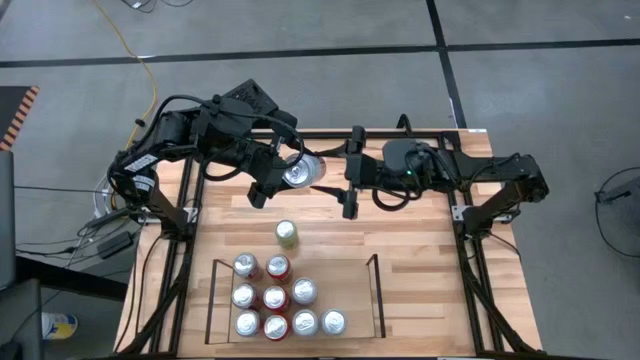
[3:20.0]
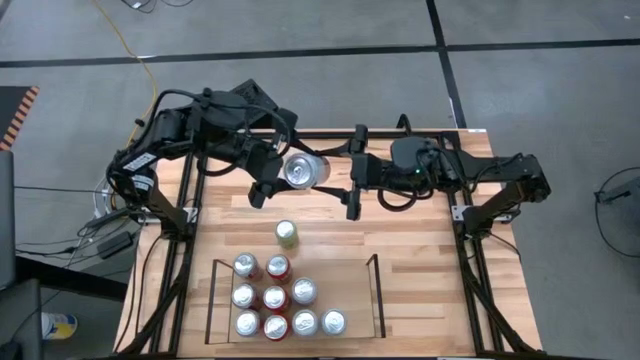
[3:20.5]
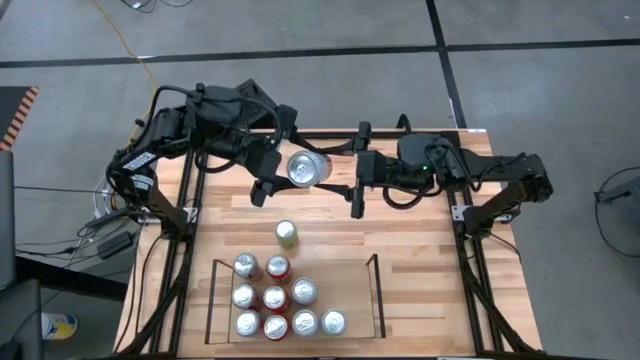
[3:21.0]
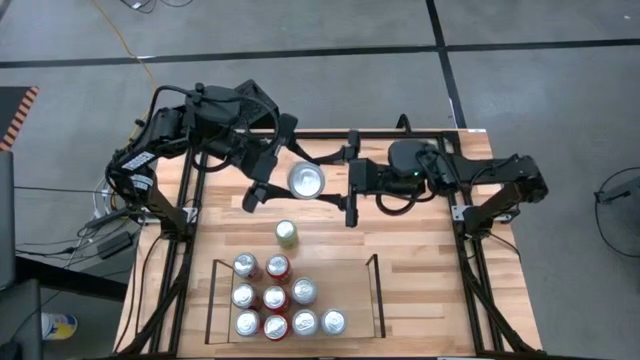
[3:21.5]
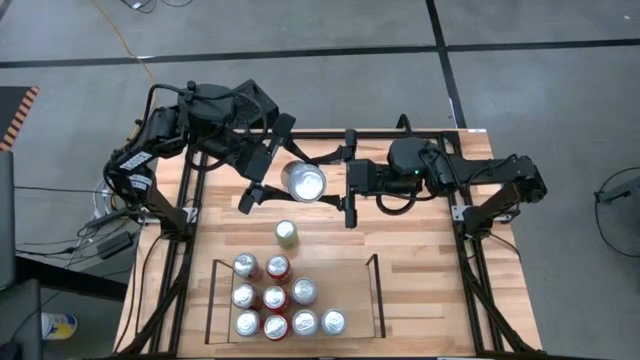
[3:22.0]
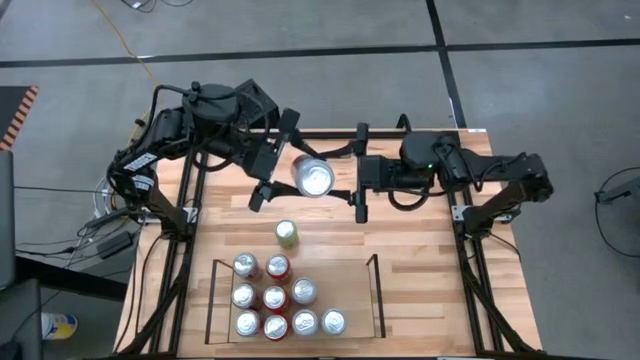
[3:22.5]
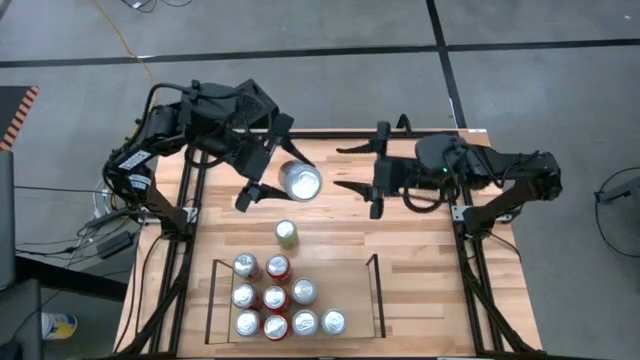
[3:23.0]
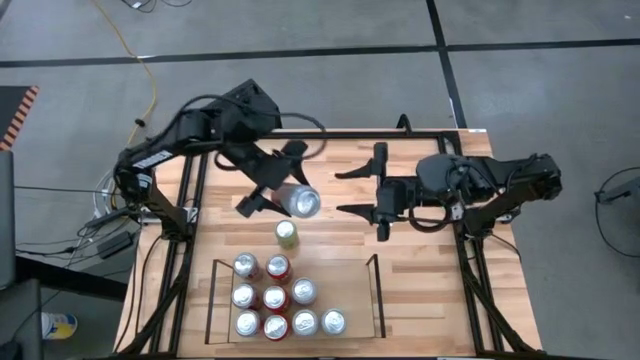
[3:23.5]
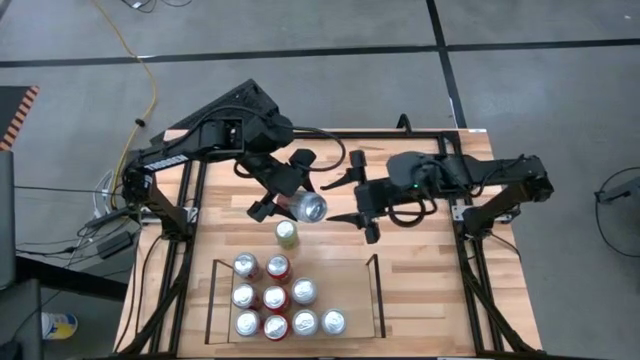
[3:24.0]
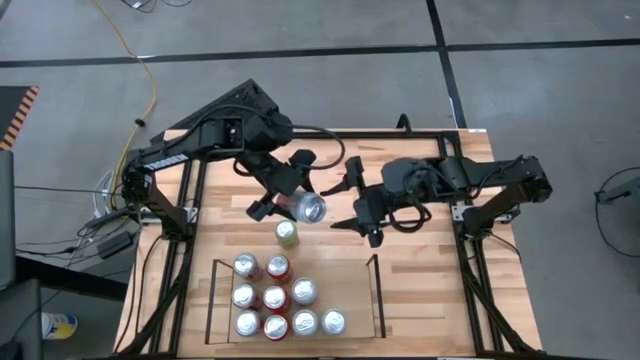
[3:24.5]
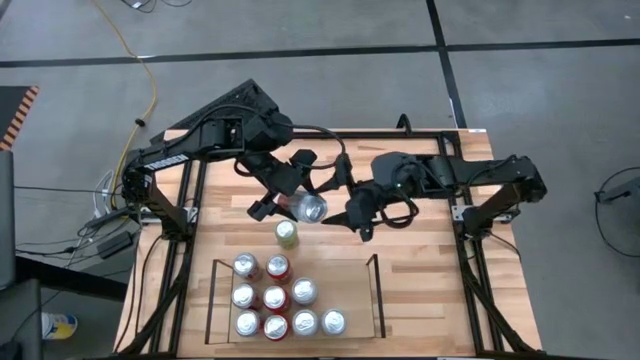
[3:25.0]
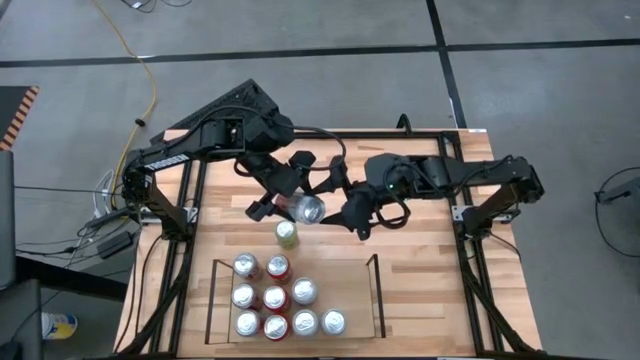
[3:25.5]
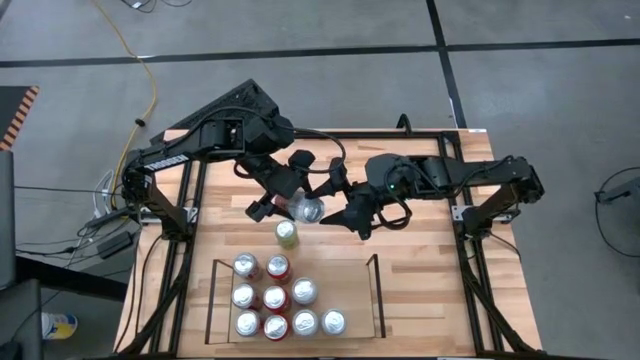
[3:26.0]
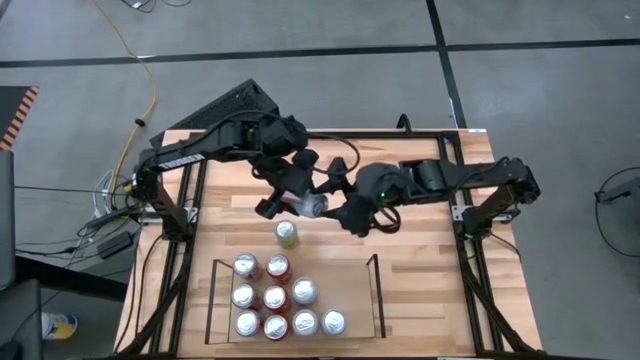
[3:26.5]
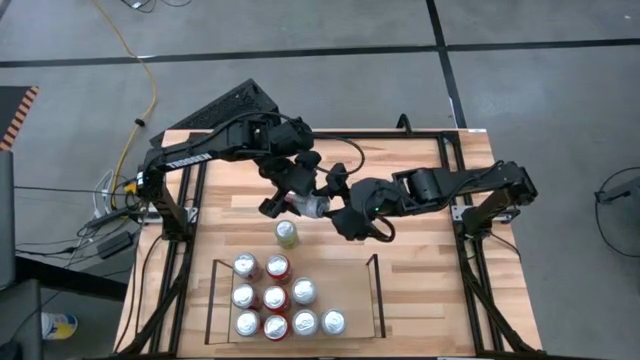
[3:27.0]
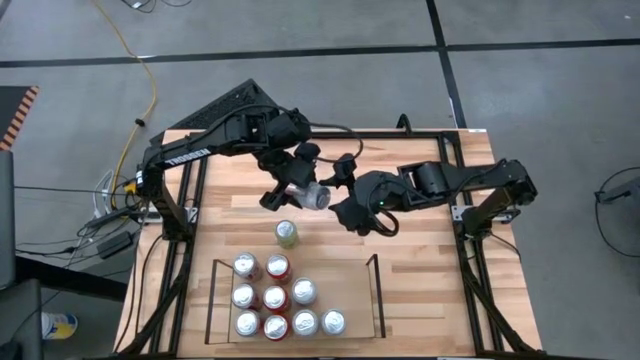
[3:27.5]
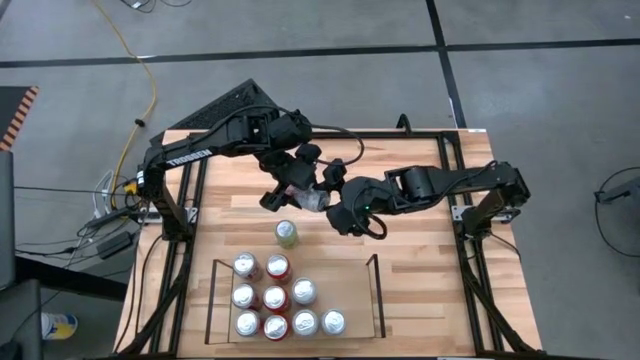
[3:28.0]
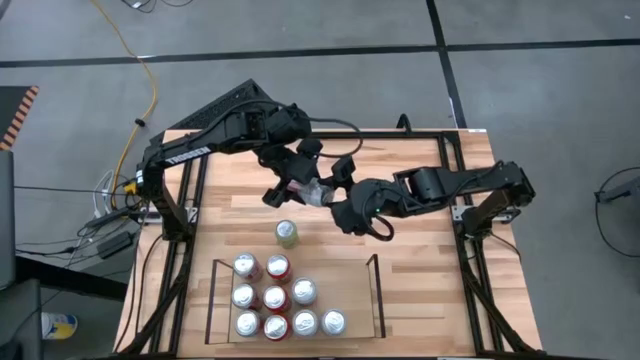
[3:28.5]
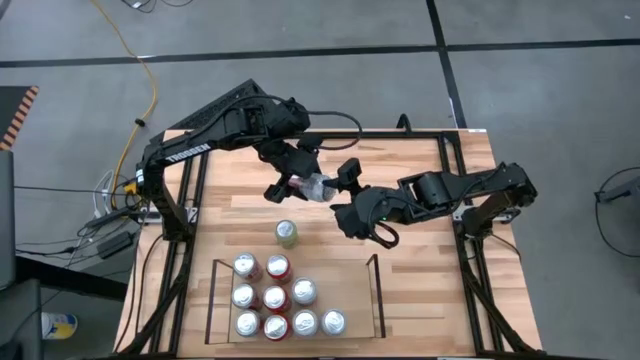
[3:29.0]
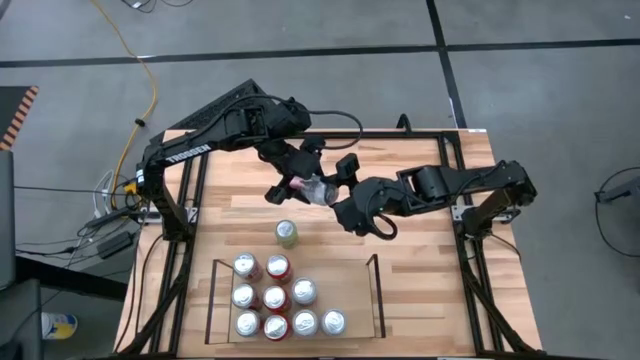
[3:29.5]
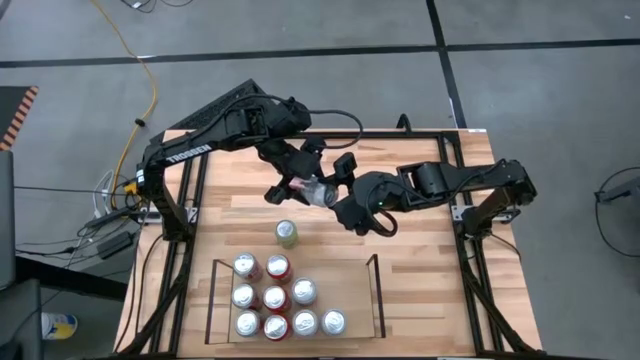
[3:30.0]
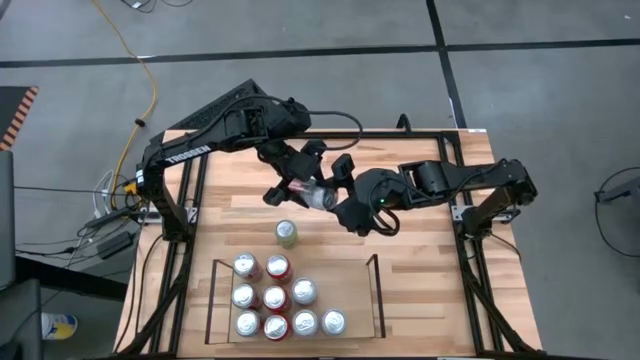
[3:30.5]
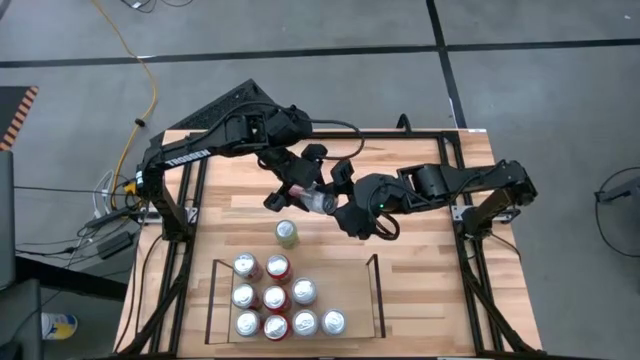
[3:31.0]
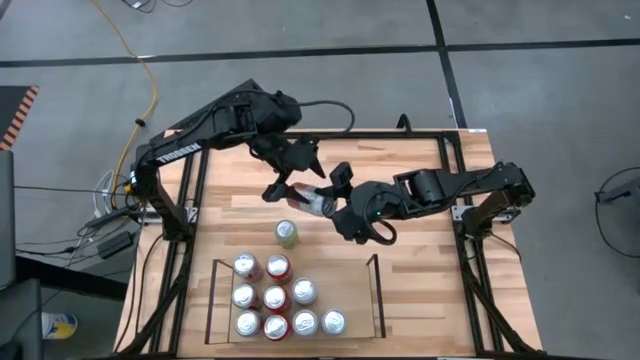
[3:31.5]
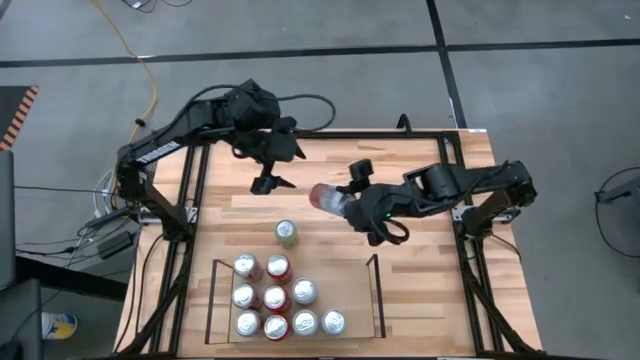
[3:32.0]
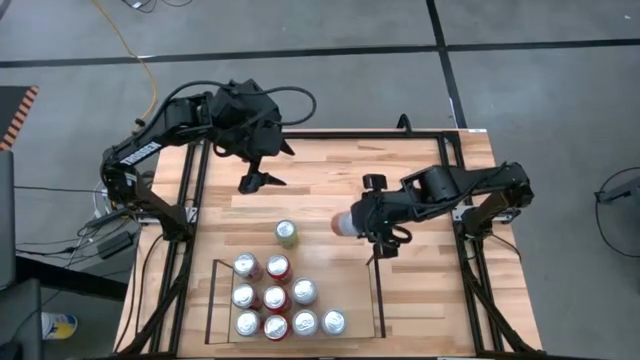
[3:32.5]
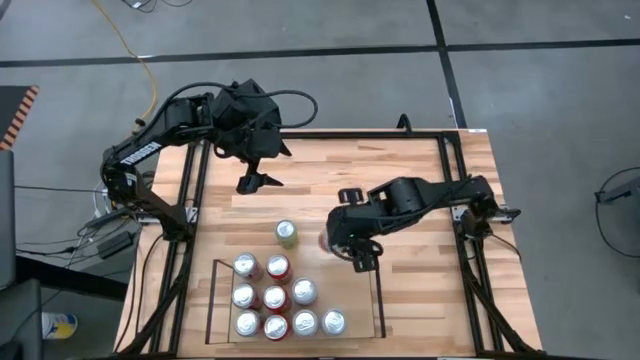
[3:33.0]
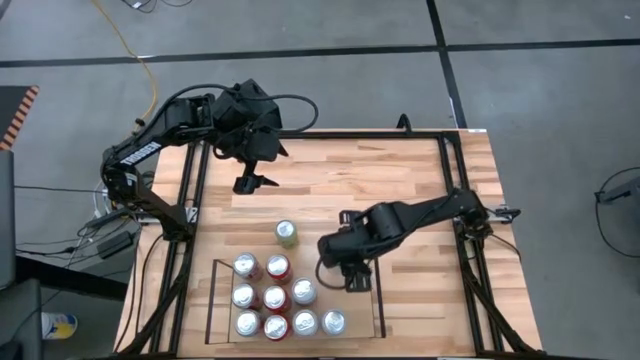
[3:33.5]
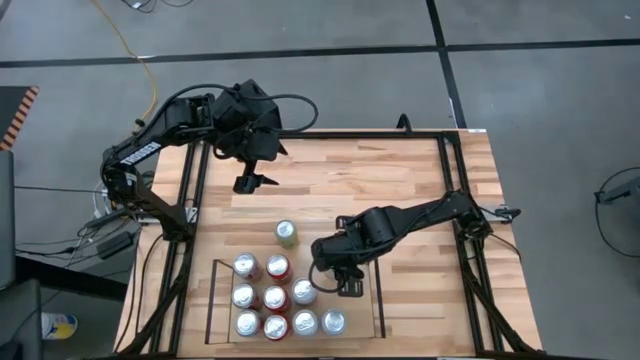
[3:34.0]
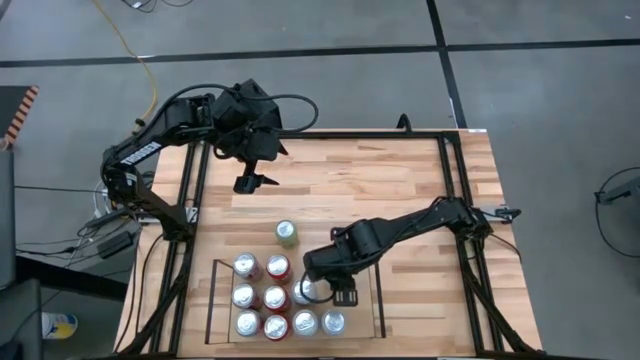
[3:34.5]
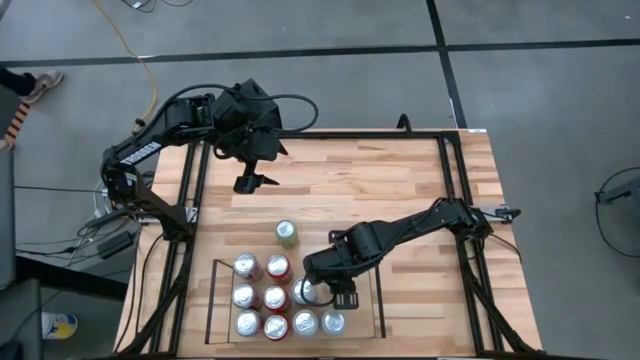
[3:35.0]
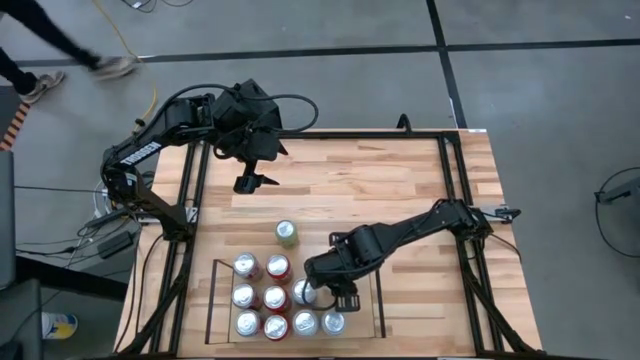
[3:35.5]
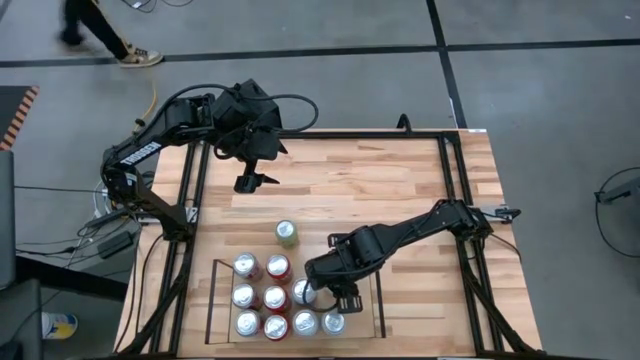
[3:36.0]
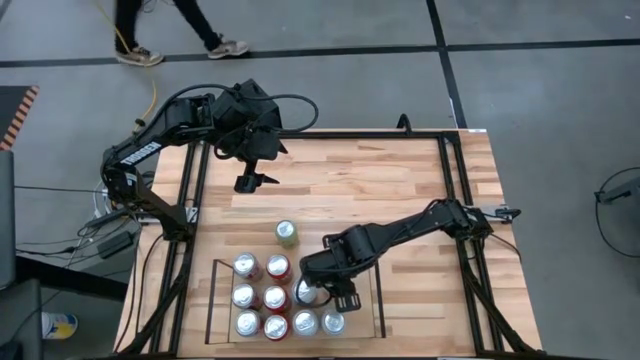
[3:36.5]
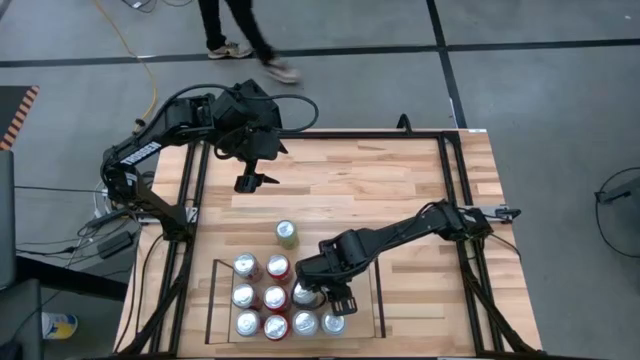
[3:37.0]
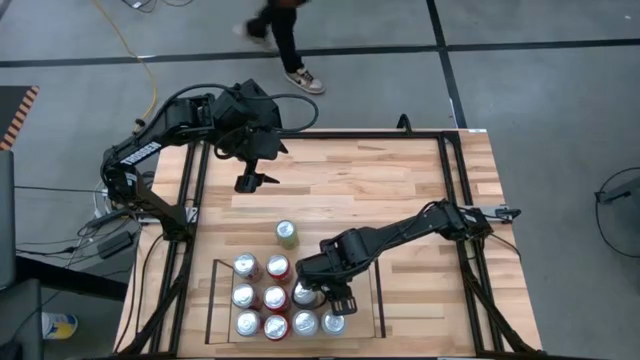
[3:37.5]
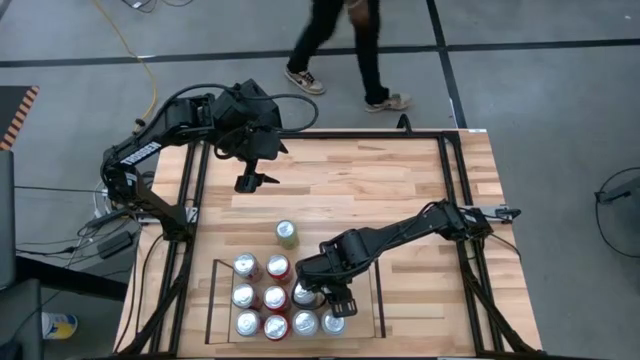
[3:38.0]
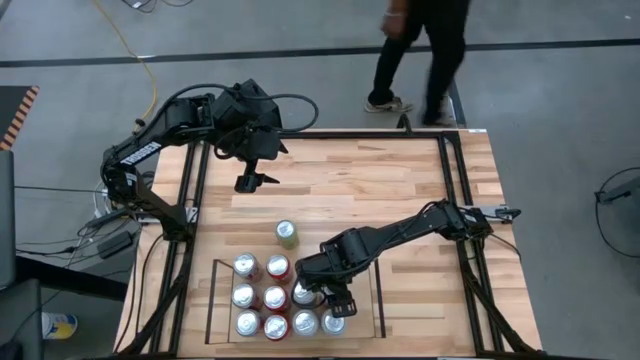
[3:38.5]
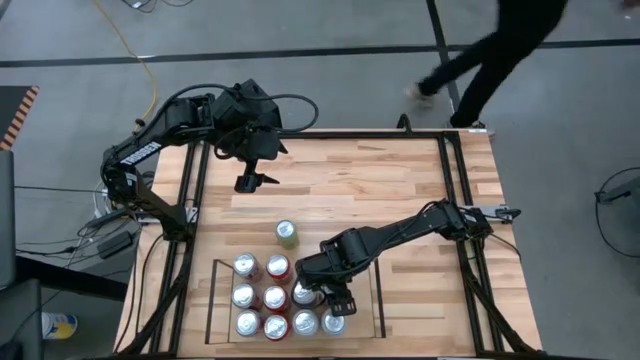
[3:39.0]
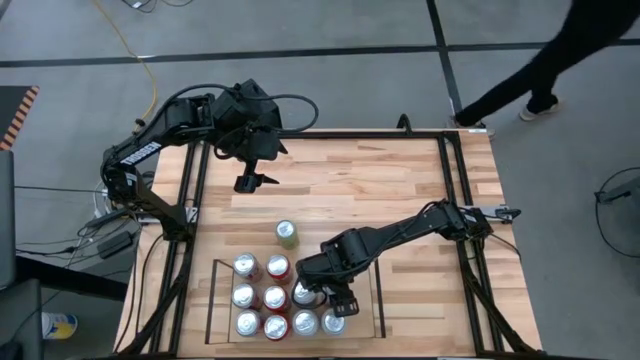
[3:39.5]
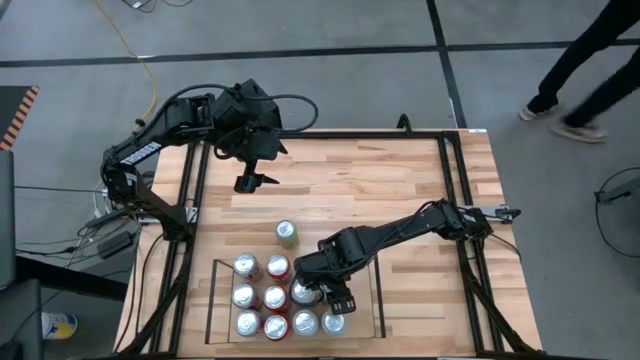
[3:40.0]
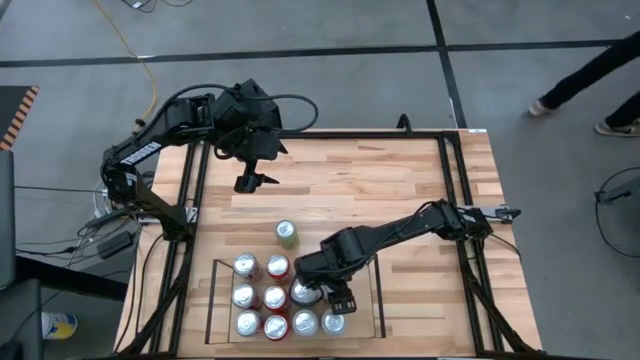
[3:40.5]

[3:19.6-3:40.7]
Task: Place canned beverage on shelf
Put the pink soda can on the shelf aligned with the other pink soda can
